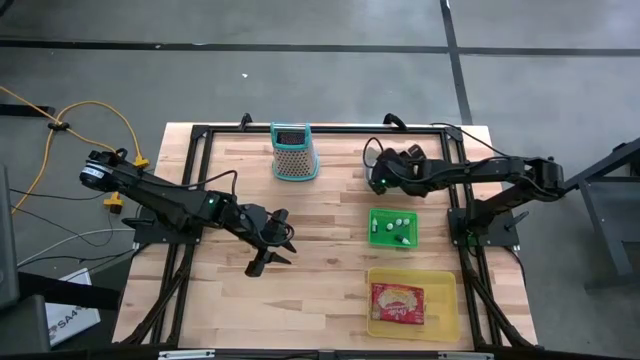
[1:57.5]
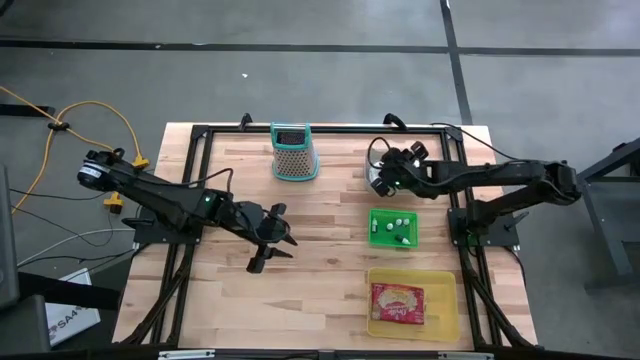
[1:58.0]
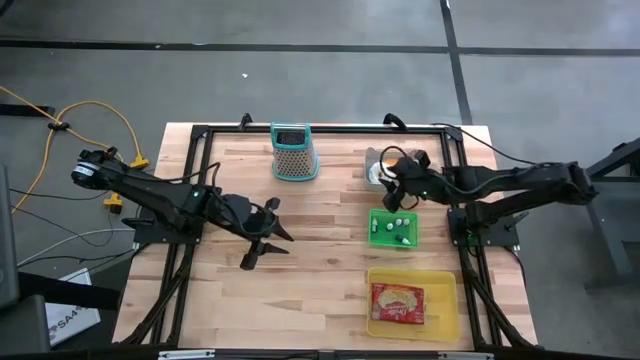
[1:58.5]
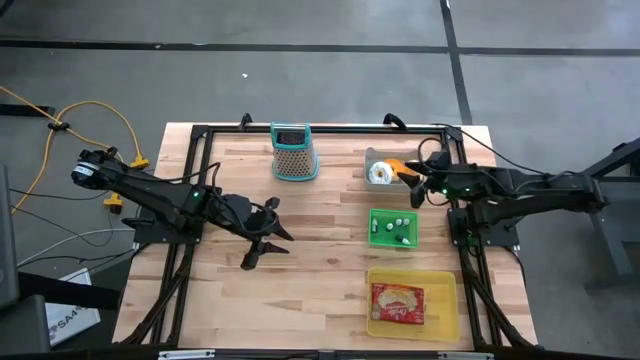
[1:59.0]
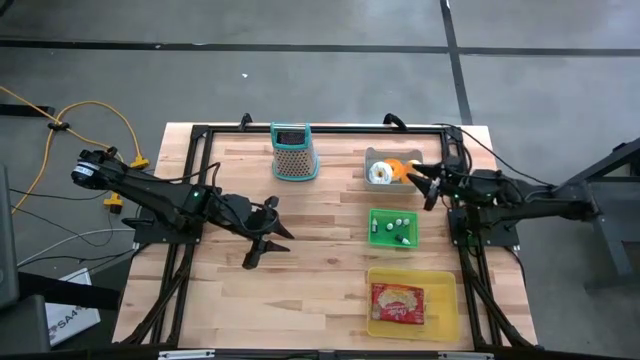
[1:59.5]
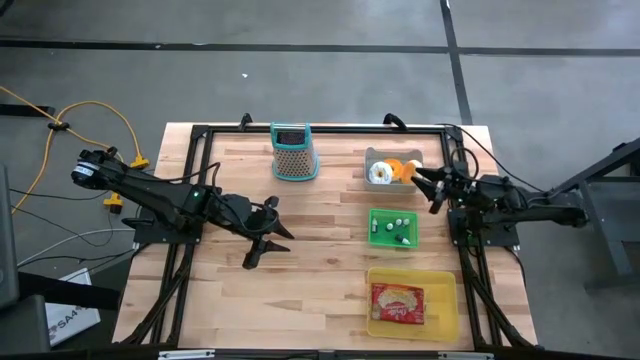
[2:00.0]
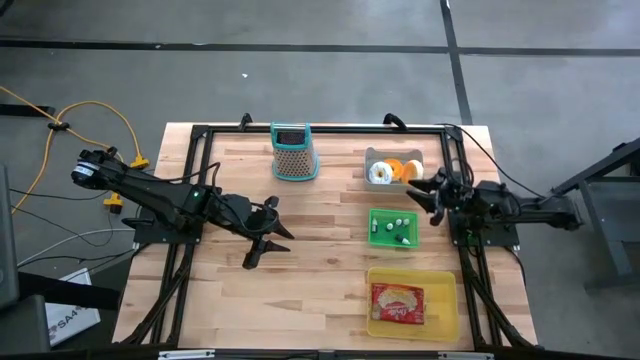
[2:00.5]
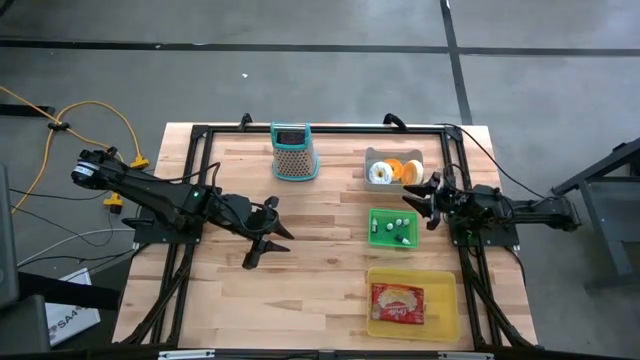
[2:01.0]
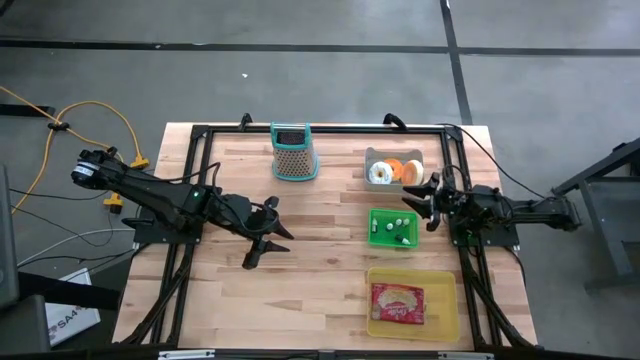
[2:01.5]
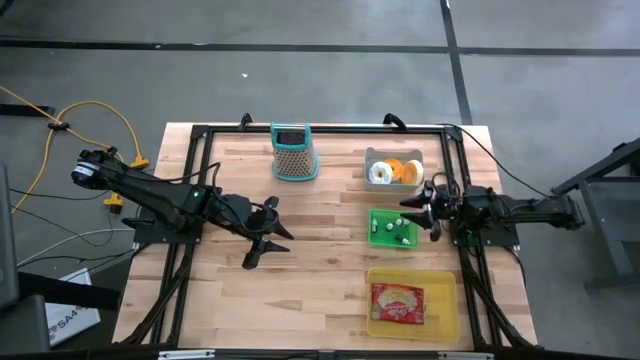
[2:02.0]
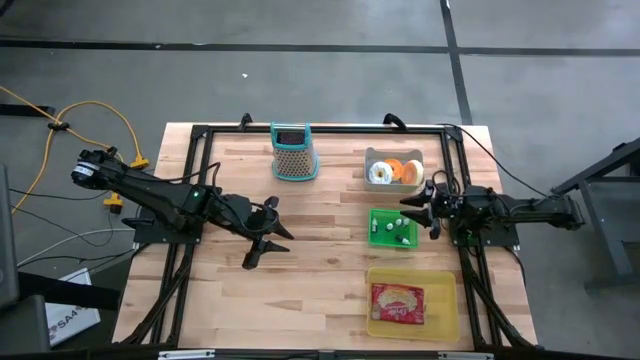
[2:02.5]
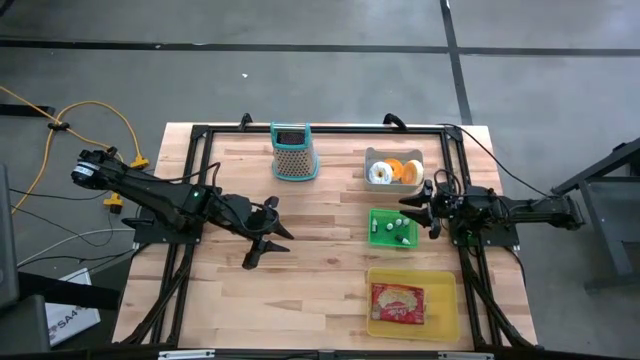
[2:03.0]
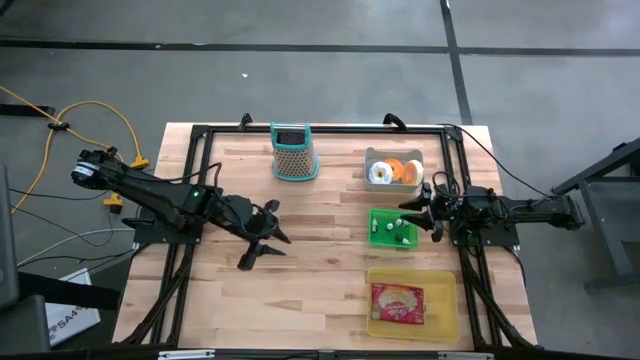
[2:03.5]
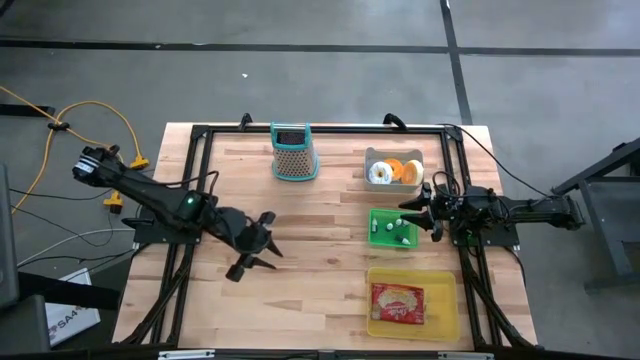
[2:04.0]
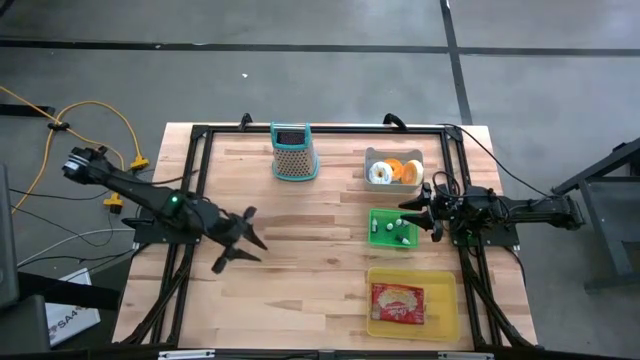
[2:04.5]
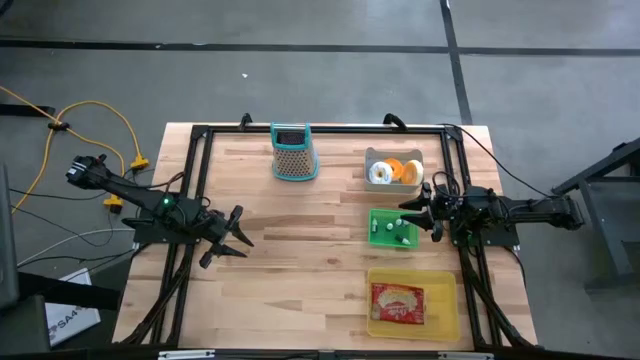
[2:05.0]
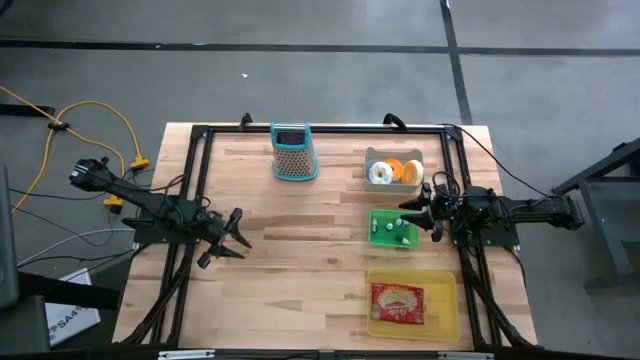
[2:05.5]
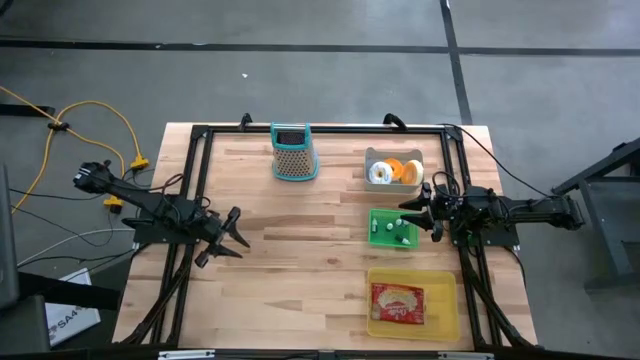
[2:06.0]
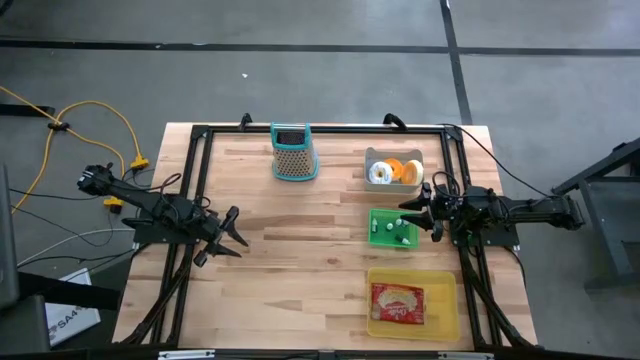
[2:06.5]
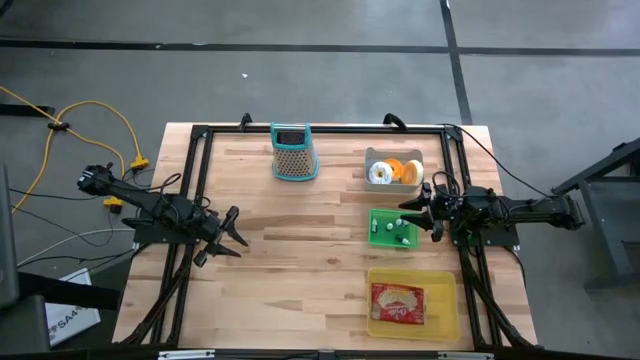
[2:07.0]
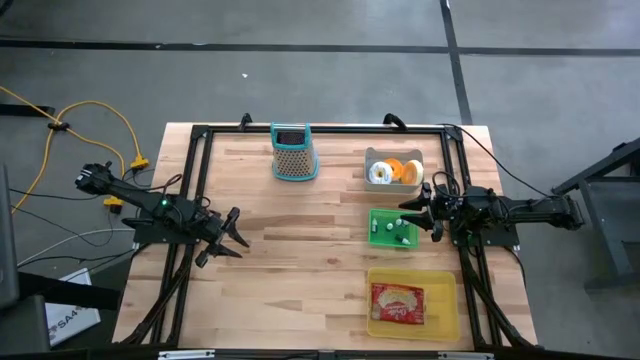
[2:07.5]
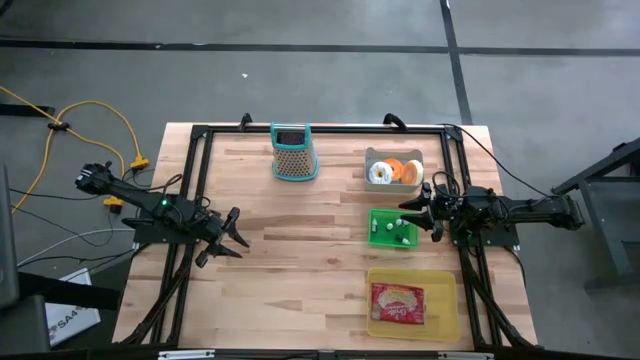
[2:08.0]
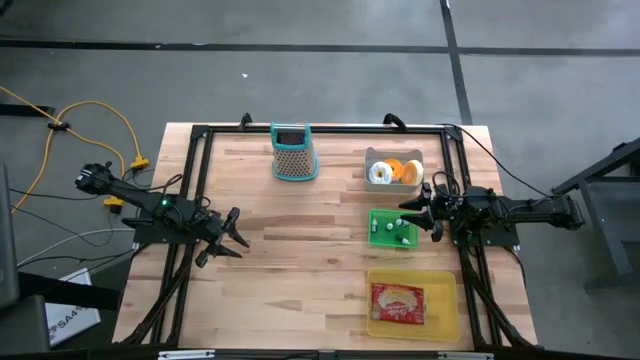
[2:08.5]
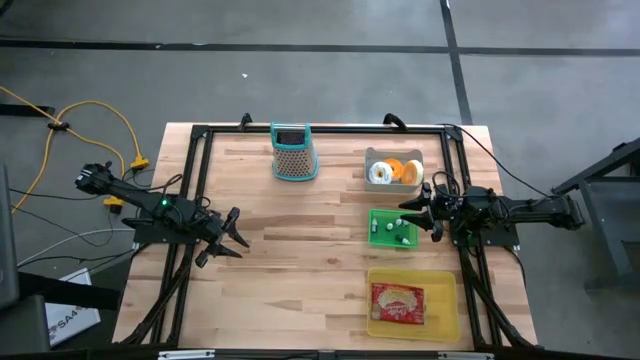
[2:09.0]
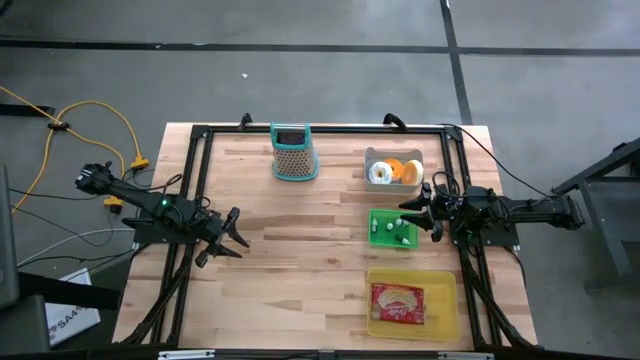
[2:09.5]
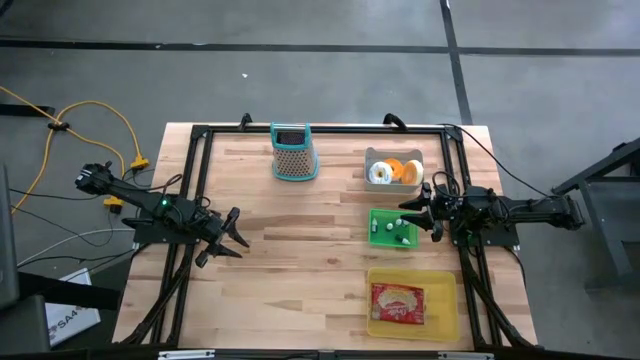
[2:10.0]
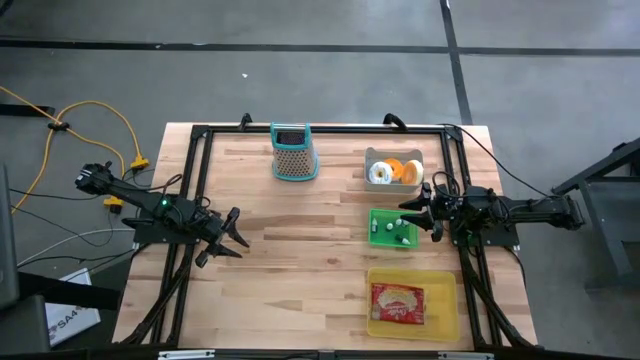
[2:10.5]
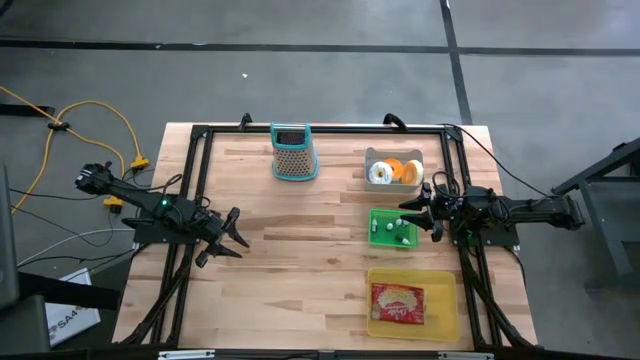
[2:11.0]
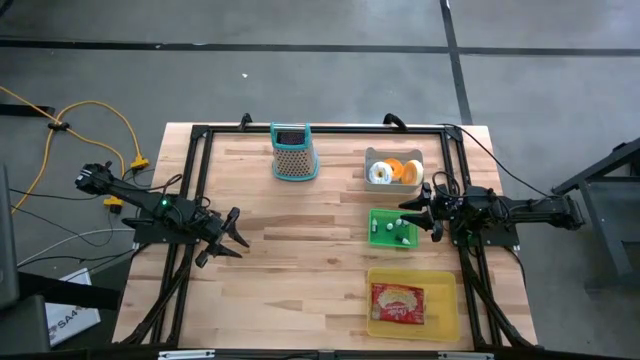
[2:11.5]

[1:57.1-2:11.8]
Return to Home Position
